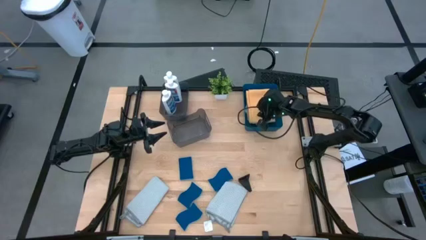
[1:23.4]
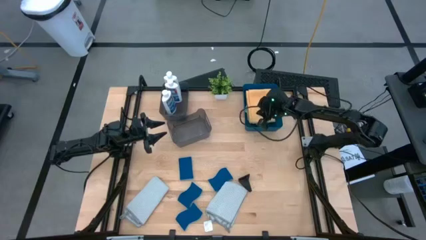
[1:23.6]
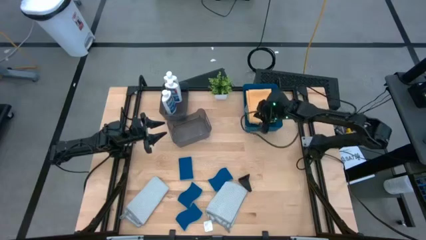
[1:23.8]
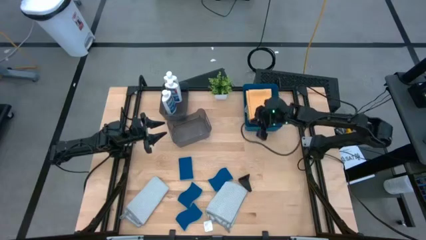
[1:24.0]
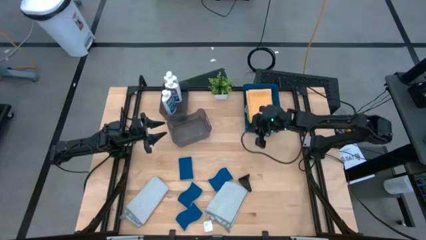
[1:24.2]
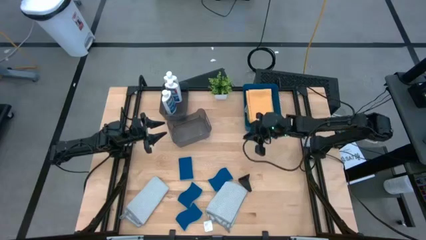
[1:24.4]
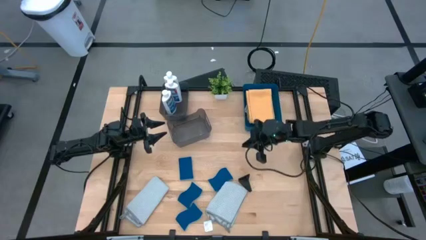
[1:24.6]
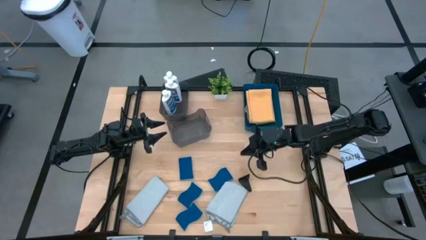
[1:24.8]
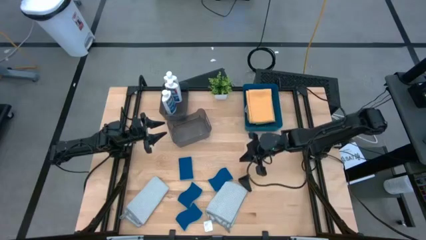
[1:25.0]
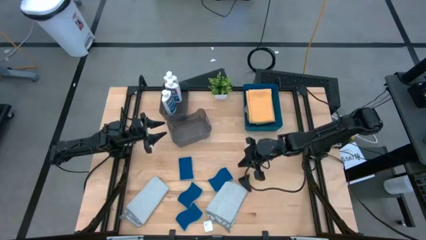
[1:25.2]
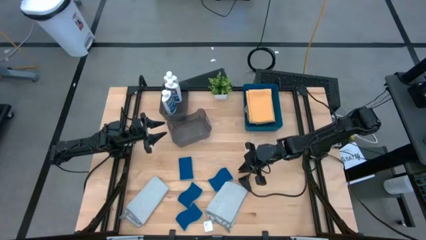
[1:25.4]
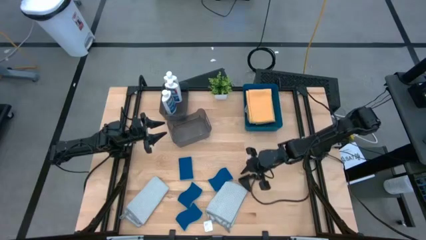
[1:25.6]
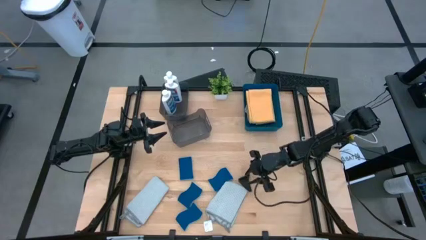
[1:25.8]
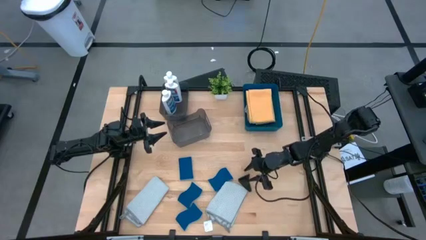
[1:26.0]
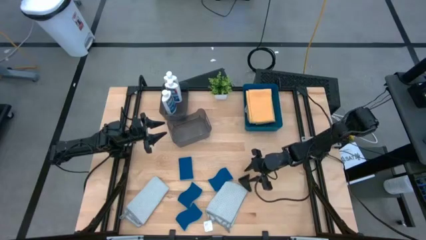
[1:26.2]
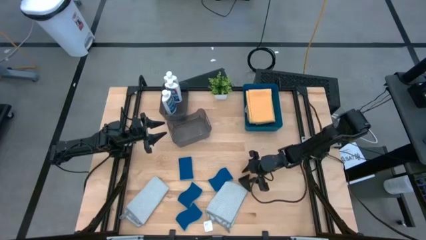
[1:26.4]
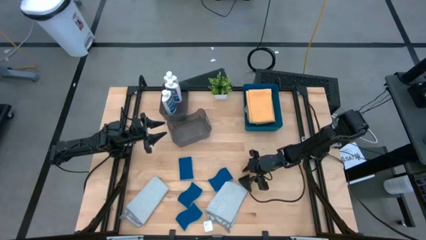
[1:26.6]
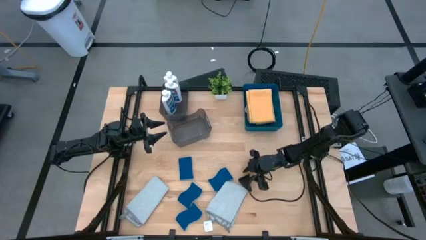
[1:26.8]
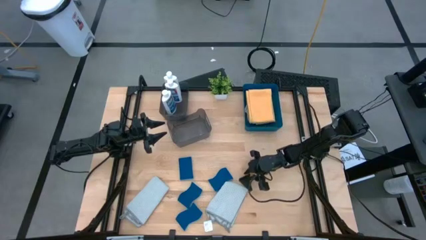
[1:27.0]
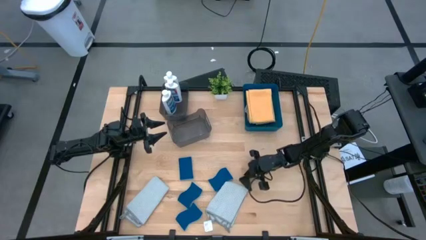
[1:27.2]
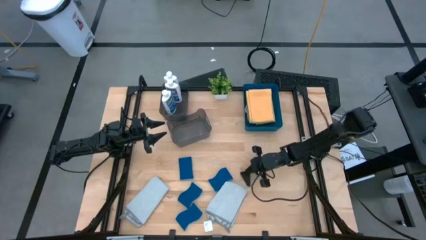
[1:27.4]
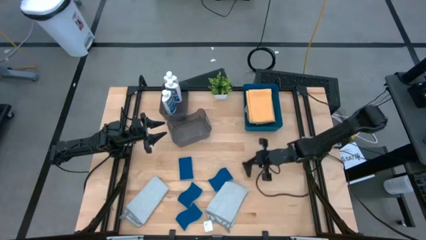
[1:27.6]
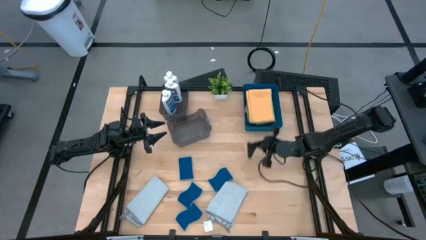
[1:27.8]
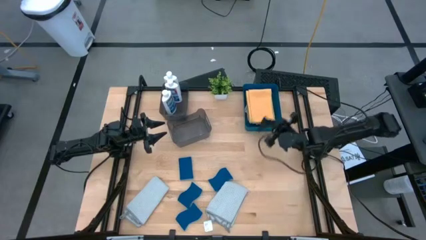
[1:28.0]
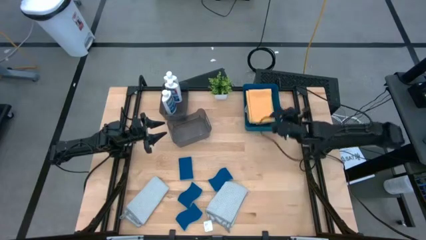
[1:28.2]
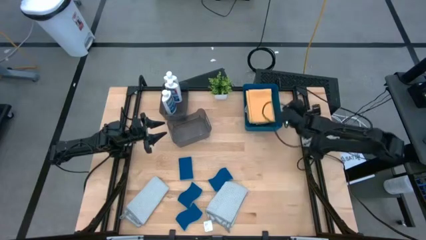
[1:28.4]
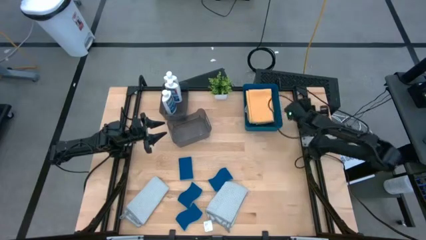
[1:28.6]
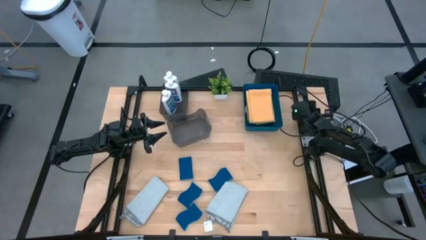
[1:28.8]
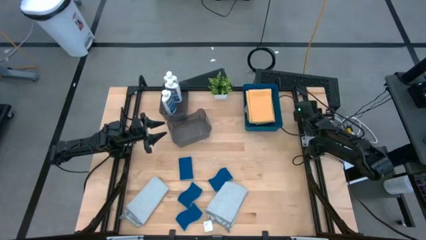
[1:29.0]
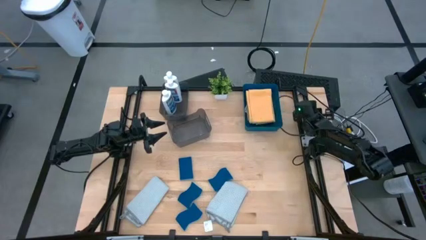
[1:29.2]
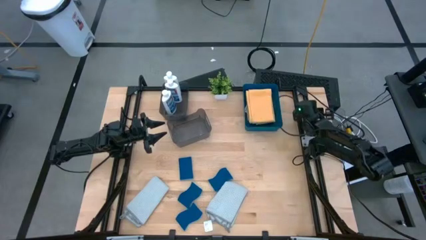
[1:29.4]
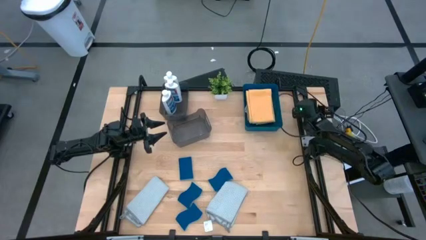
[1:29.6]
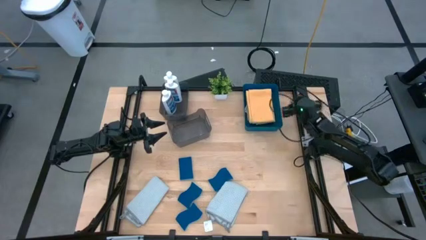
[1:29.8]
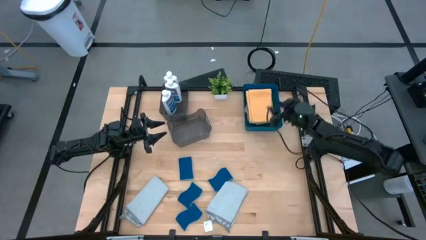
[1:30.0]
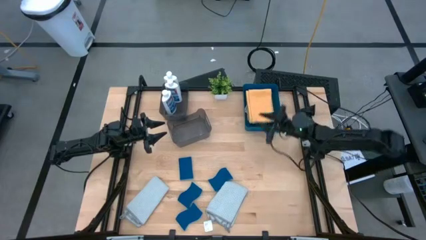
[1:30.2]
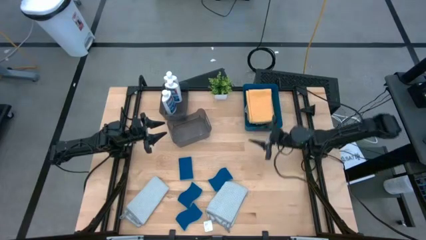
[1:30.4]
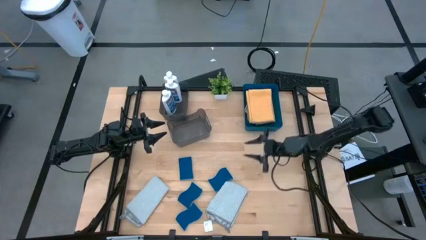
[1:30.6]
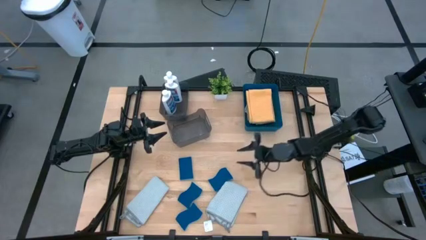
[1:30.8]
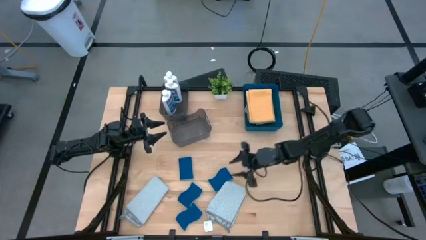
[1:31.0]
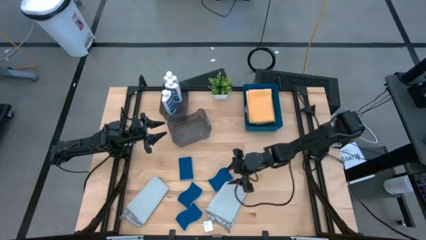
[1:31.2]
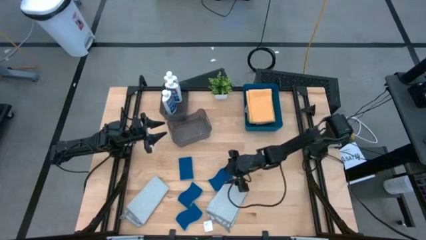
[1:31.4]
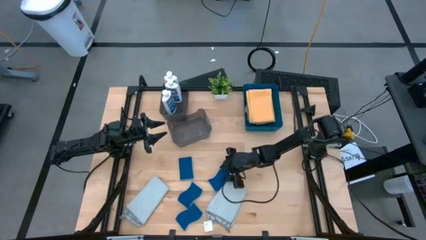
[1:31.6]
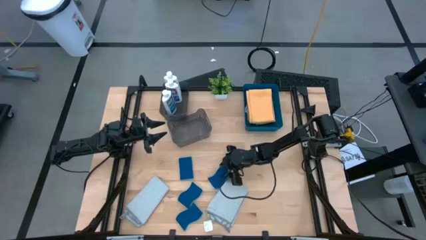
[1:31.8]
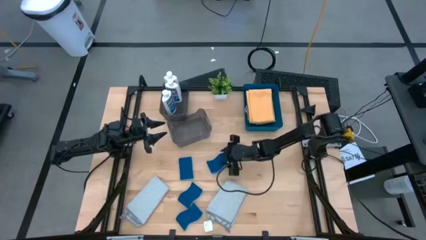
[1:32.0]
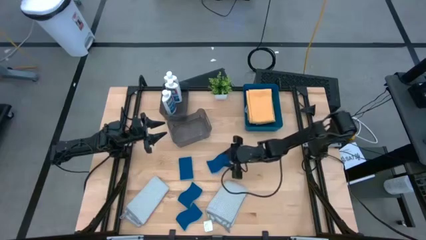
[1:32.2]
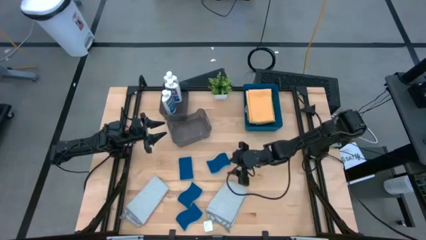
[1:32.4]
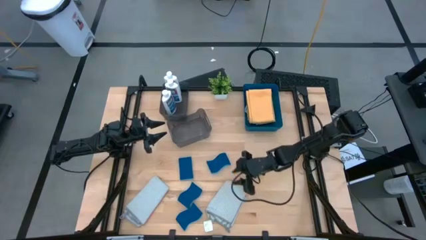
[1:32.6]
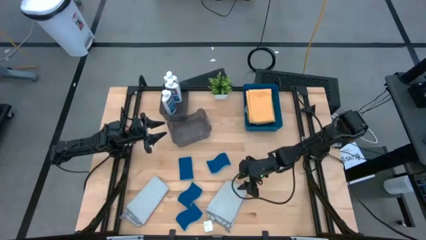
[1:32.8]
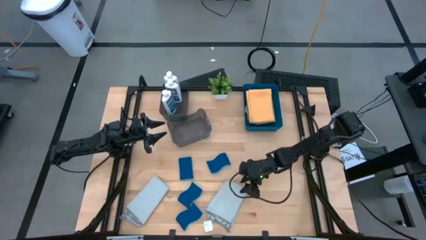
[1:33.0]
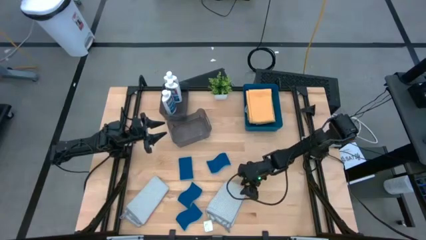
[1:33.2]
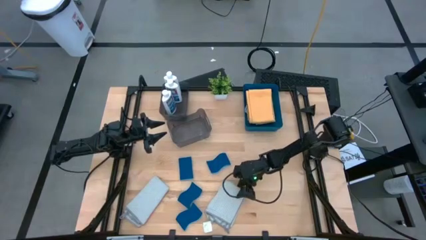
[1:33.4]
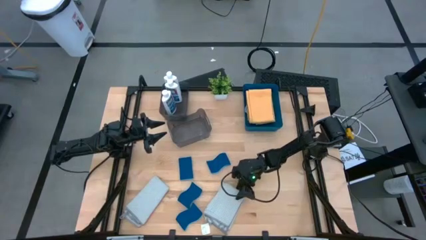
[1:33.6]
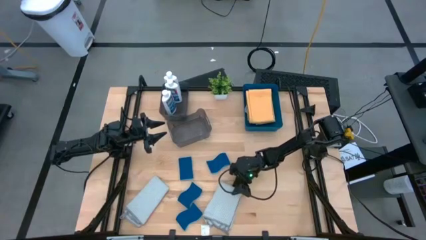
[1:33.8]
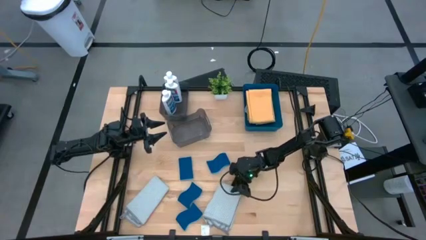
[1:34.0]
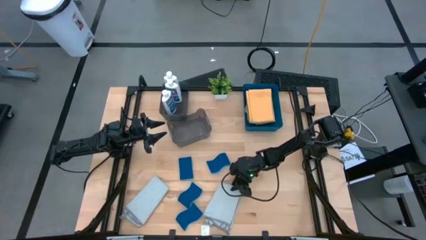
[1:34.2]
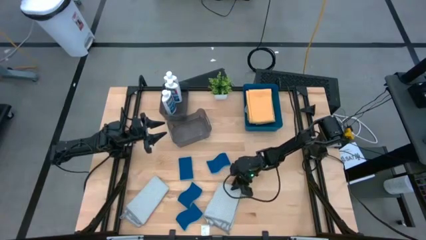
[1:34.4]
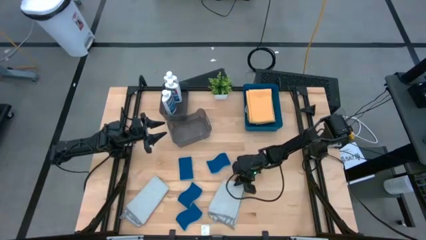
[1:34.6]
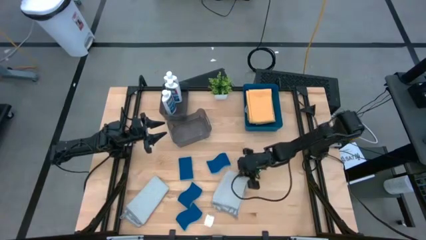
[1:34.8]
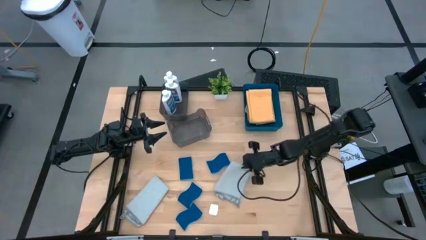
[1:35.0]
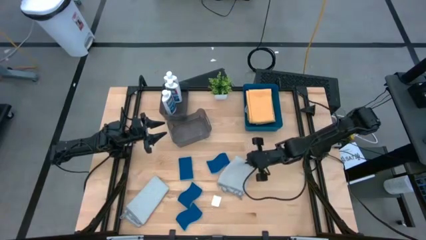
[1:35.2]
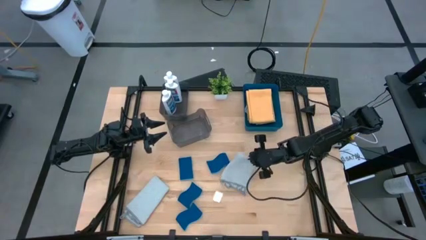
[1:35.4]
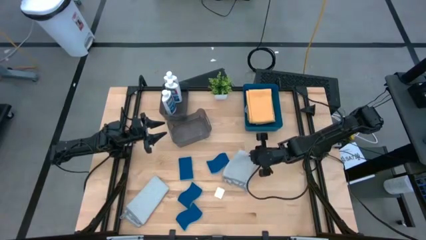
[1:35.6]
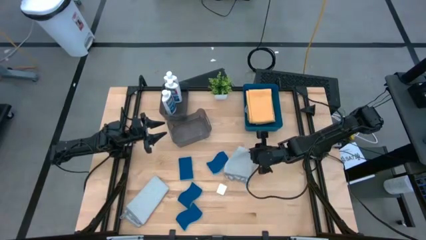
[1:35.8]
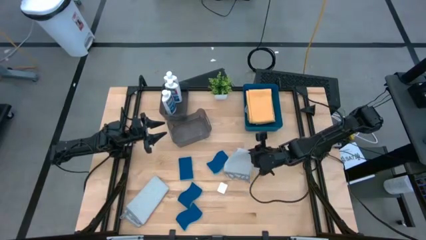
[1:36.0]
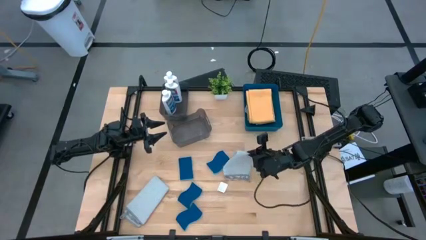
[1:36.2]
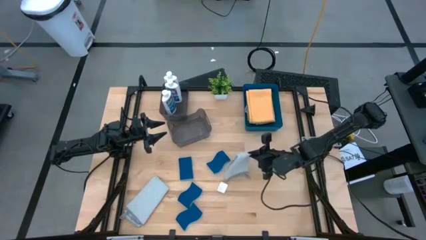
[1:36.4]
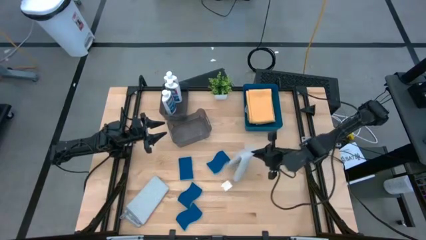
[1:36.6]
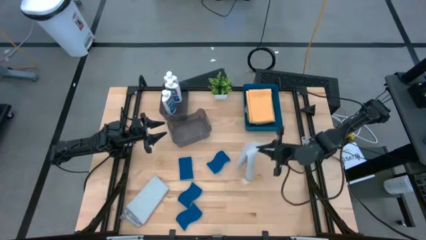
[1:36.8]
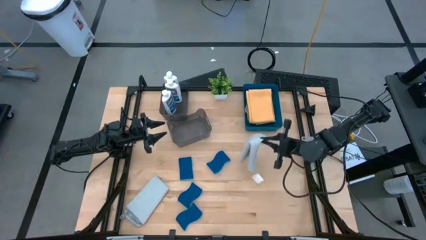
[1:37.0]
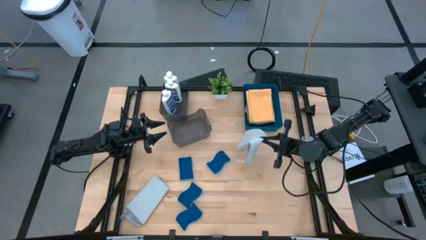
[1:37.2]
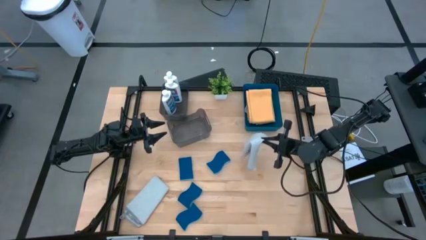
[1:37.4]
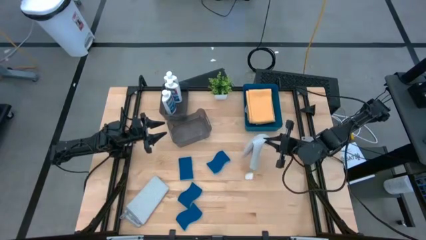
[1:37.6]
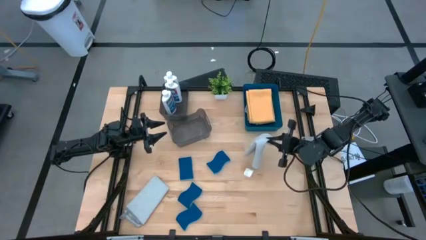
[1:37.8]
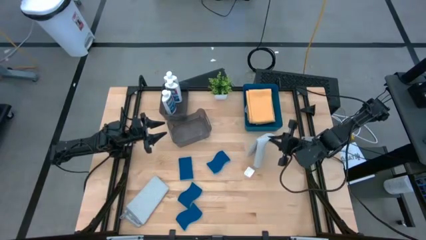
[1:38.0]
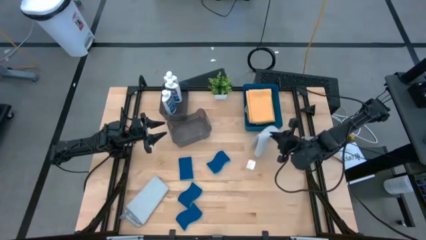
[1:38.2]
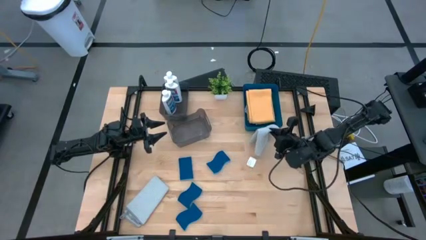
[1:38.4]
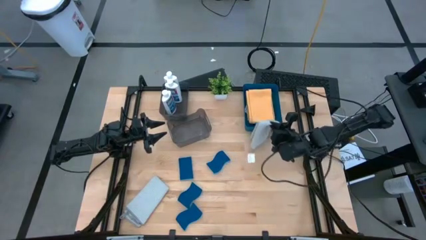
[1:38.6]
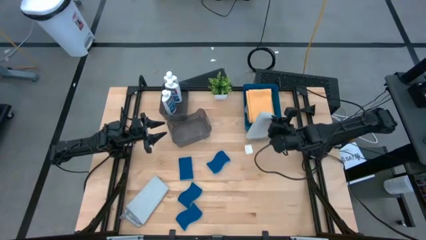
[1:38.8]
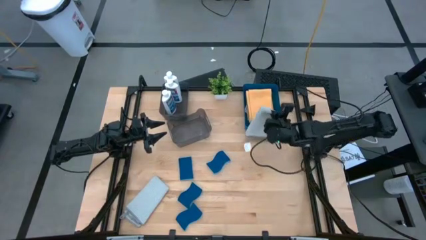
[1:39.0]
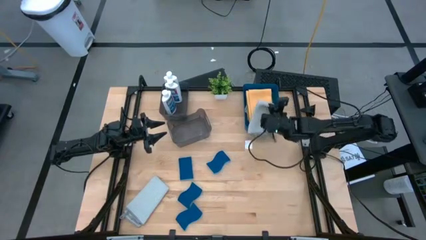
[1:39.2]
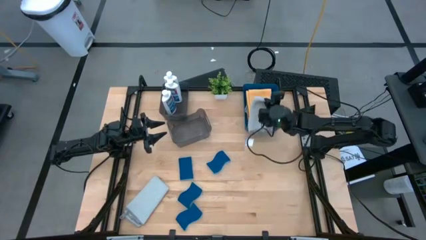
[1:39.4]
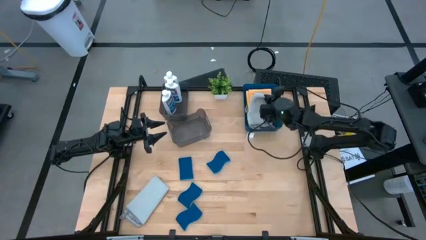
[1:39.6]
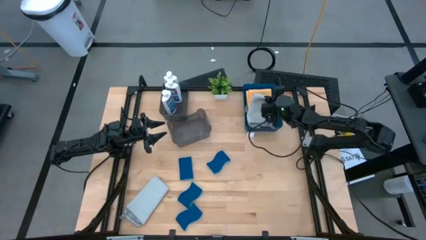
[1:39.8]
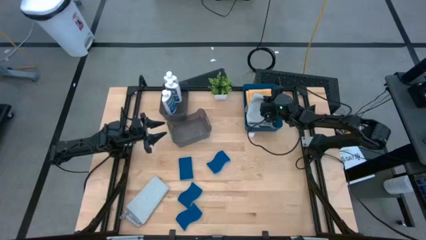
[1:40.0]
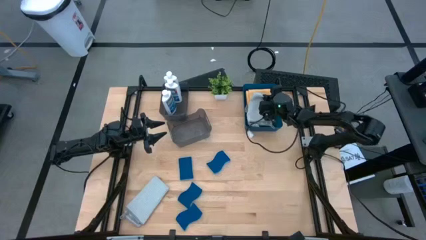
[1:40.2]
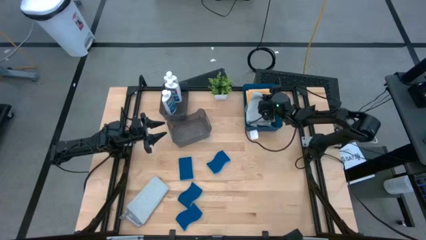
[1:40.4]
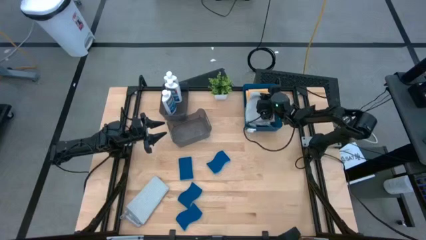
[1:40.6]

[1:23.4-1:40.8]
Task: Pick & Place Kitchen Items
Put the gray towel into the blue bin
